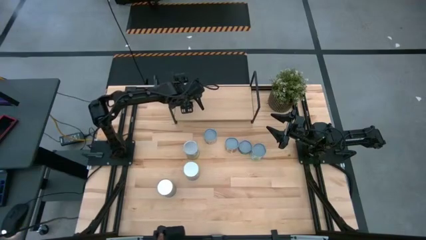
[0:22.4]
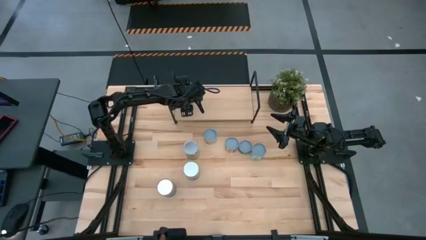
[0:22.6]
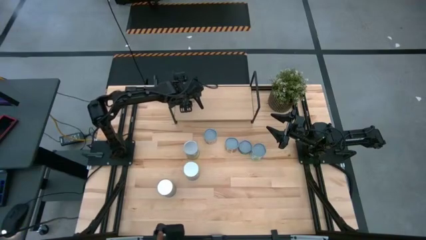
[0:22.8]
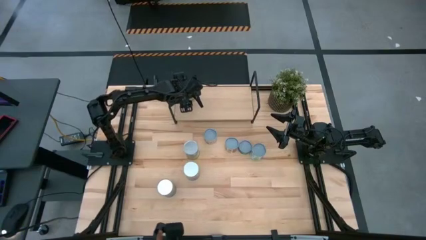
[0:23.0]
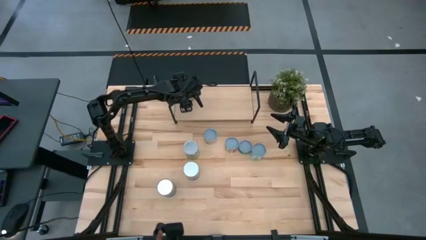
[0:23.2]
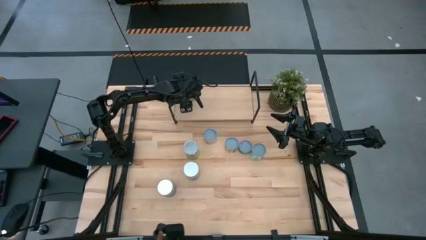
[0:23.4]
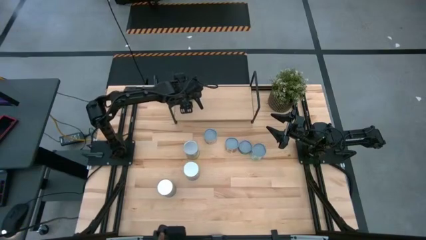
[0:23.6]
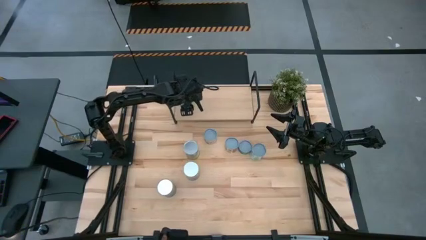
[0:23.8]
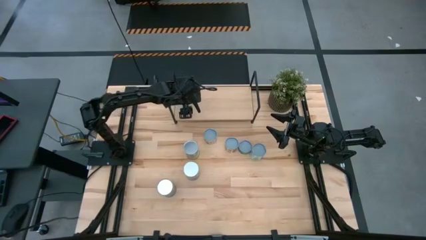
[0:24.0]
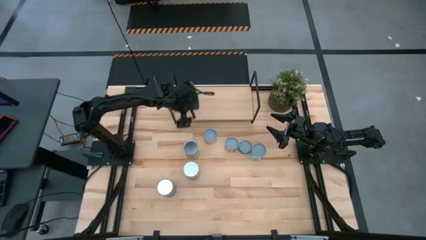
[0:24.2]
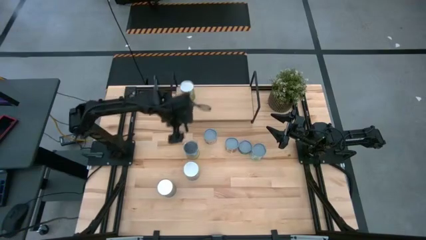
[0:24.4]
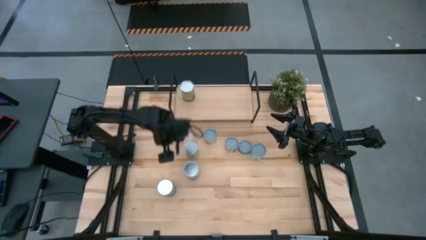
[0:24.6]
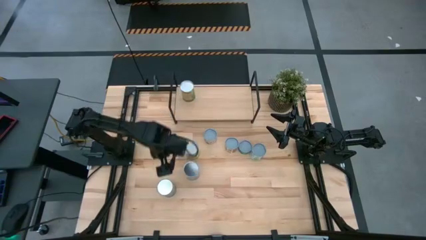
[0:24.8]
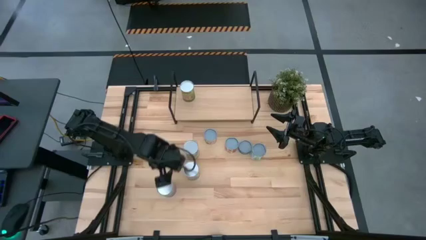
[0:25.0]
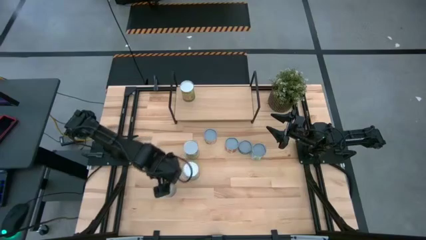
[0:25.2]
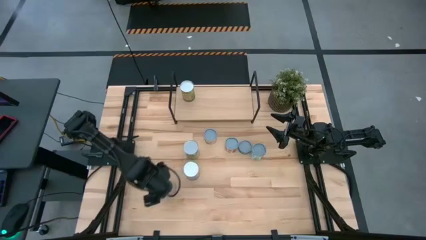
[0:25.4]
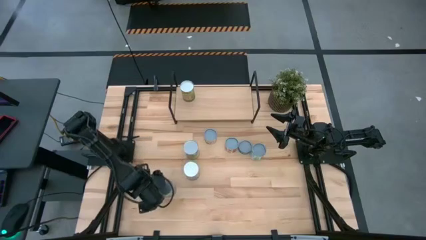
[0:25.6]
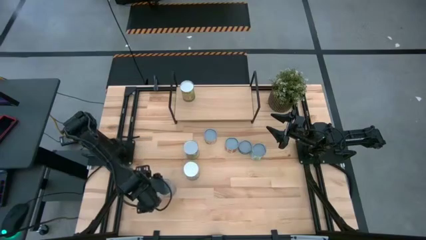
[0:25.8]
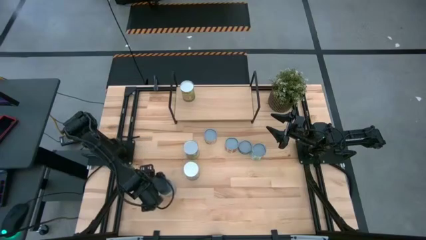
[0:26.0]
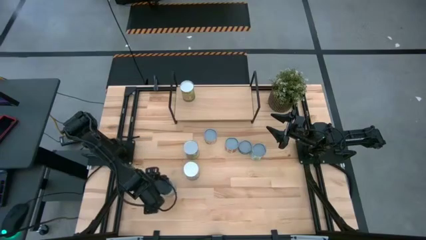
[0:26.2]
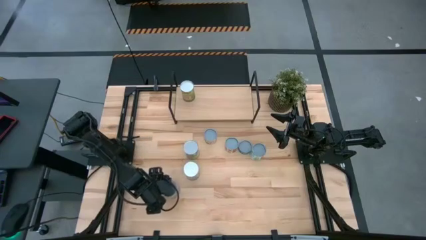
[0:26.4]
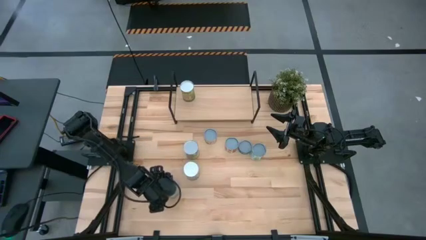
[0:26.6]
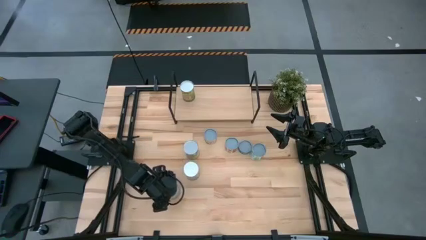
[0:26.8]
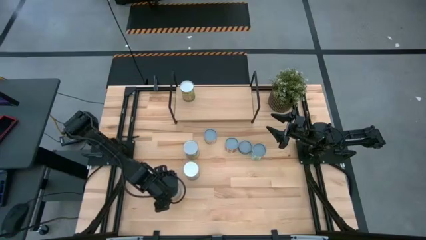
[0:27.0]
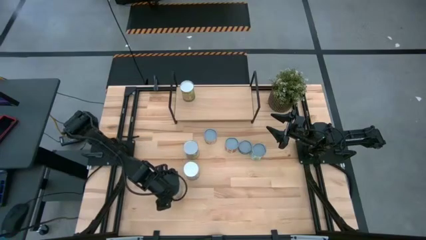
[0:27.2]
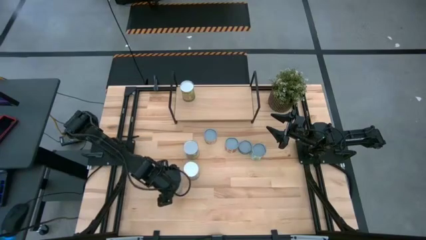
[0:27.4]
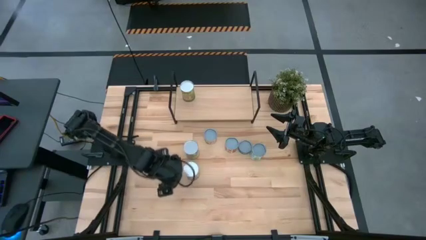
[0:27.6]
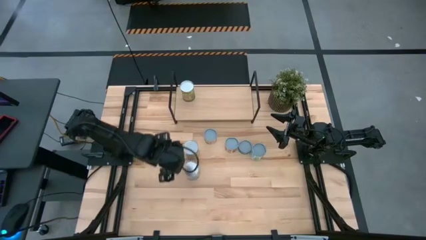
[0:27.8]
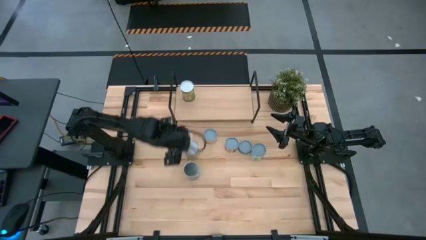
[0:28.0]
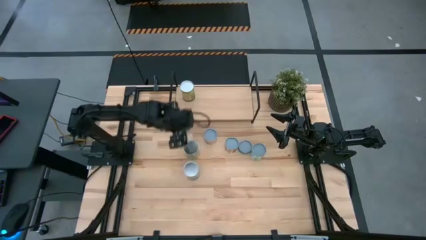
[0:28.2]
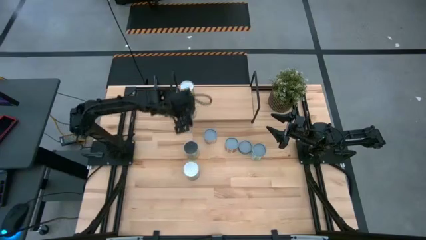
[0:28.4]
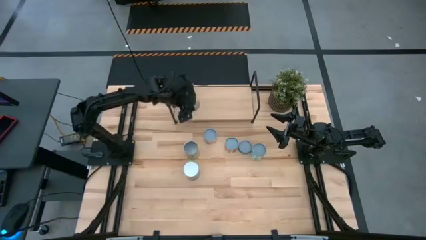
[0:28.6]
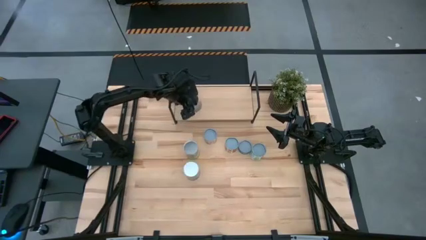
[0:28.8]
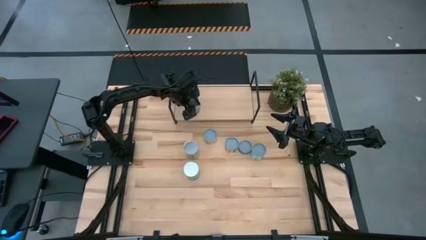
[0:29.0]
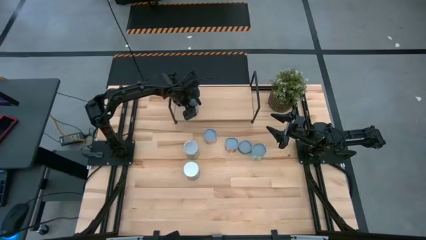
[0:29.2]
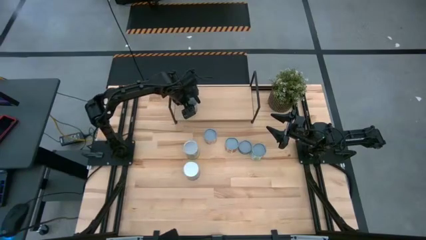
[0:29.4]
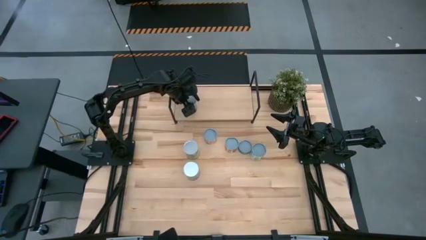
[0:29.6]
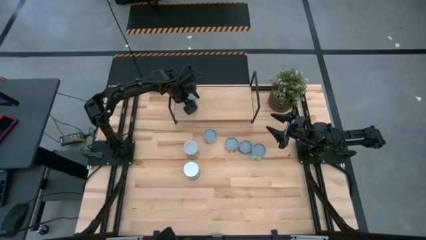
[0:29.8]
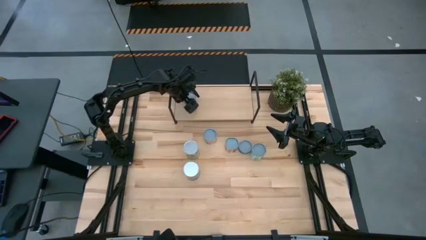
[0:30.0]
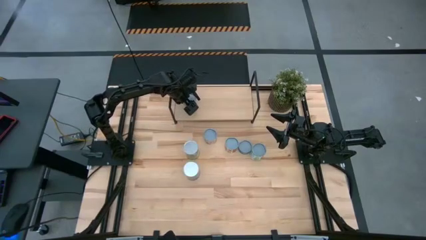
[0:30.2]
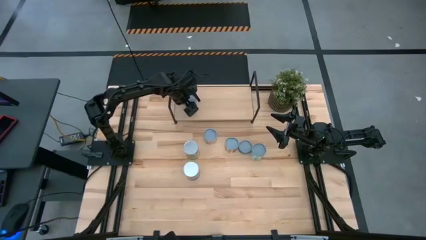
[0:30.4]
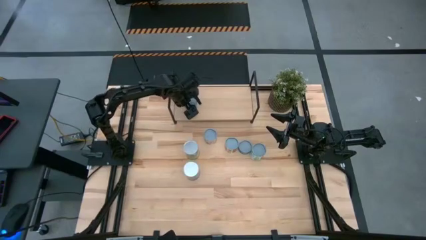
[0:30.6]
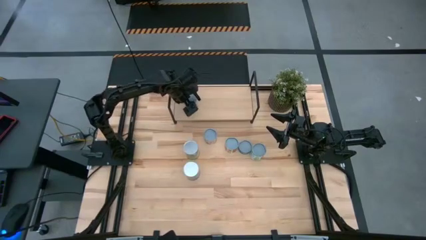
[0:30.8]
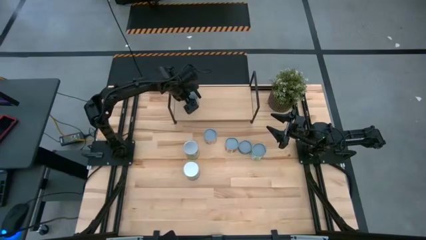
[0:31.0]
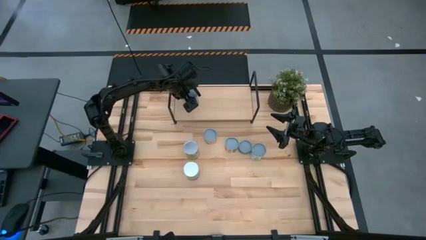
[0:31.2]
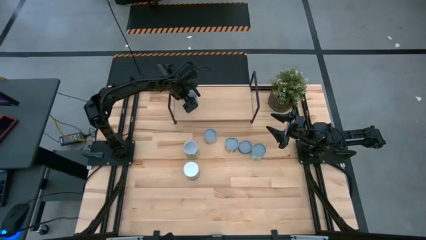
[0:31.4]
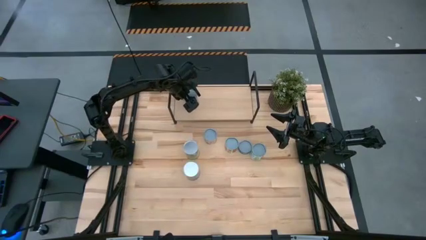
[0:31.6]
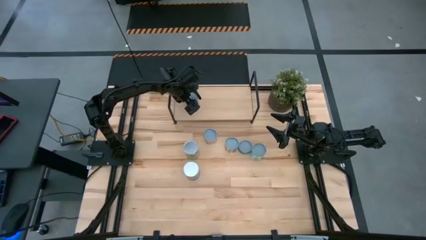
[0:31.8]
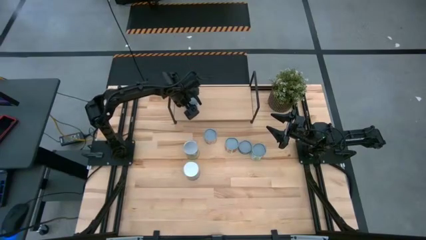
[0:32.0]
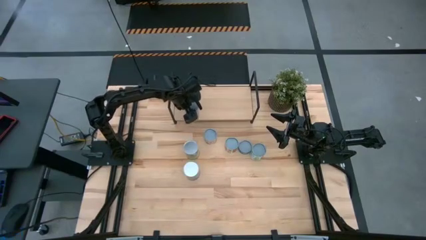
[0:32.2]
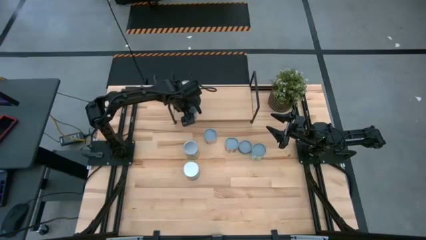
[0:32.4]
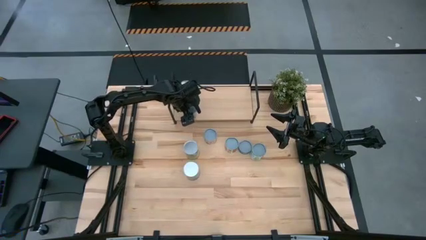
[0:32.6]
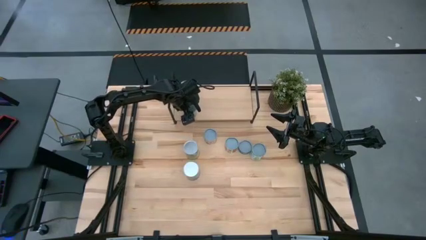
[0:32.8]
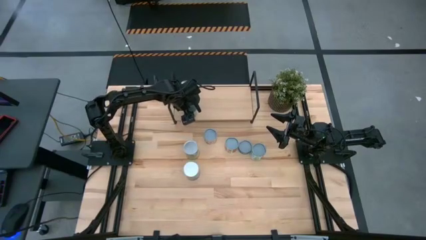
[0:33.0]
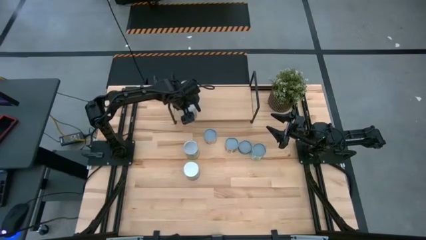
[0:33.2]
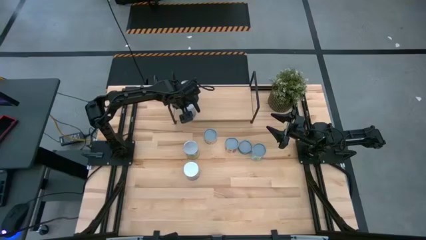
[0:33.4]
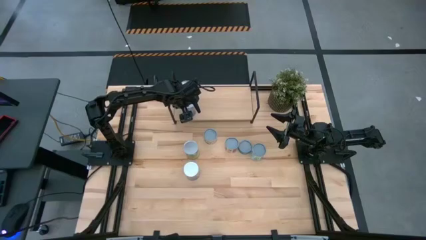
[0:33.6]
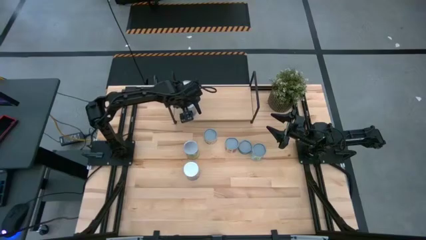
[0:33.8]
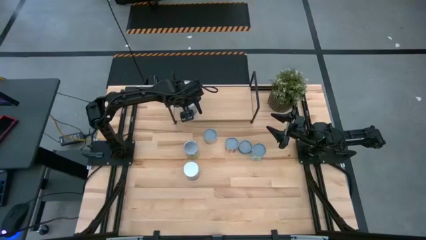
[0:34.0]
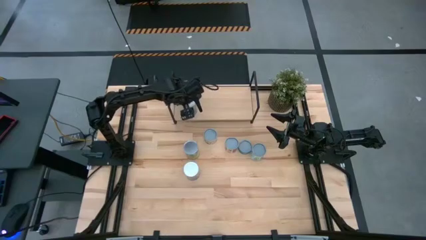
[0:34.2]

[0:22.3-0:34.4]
Task: Pick and place cans onto a shelf
Put the canned peas on the shelf

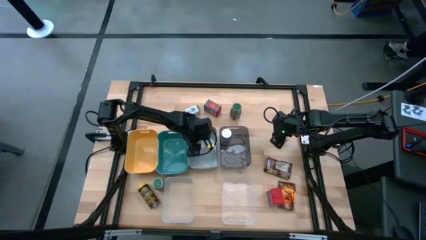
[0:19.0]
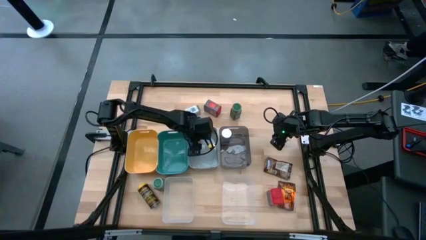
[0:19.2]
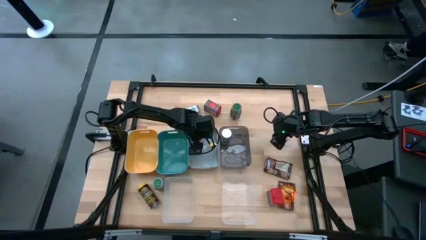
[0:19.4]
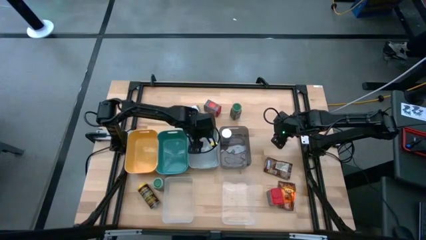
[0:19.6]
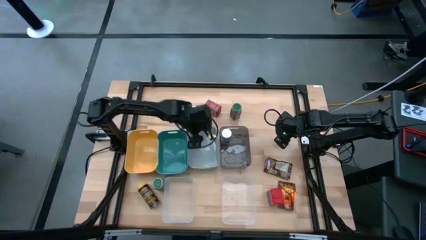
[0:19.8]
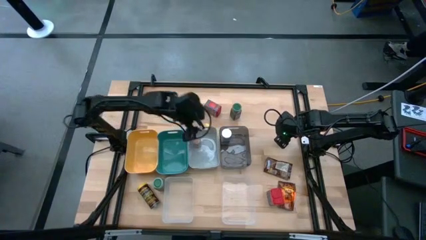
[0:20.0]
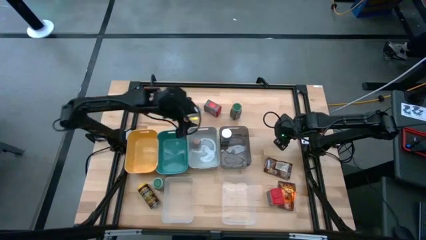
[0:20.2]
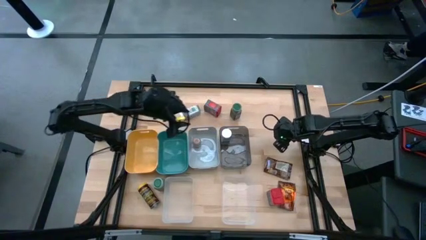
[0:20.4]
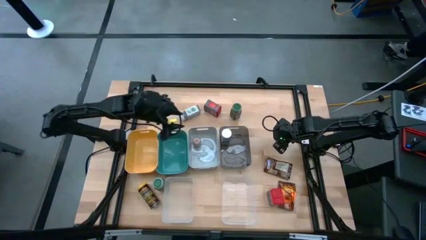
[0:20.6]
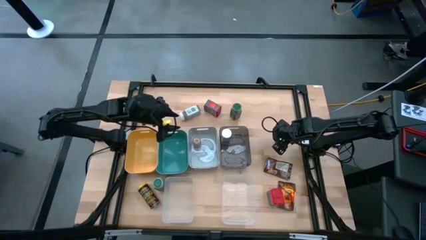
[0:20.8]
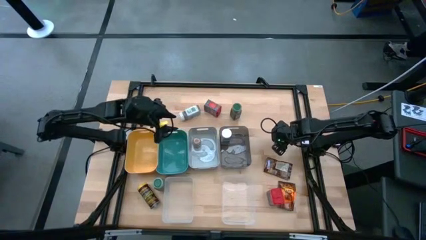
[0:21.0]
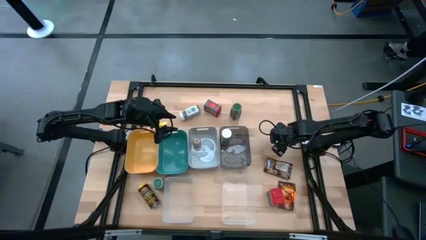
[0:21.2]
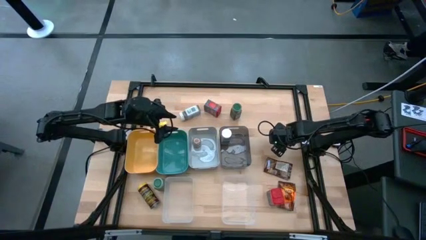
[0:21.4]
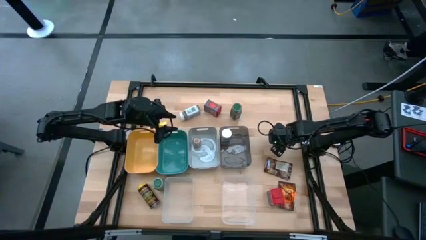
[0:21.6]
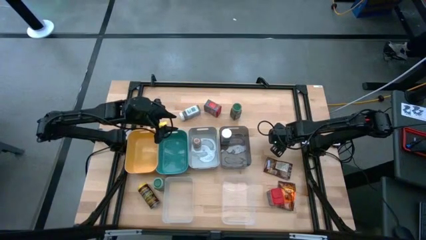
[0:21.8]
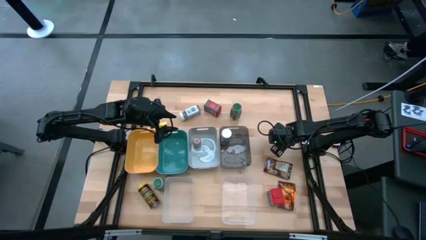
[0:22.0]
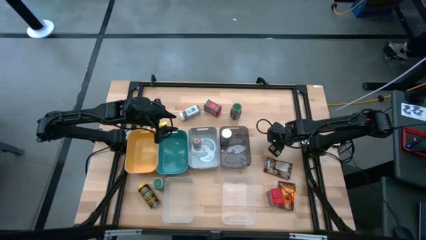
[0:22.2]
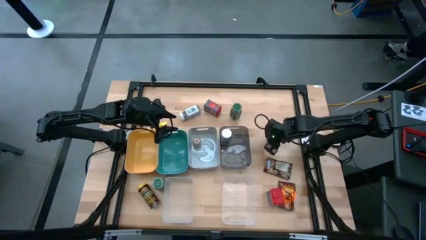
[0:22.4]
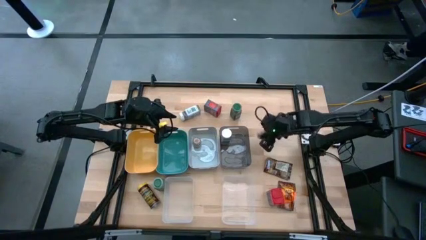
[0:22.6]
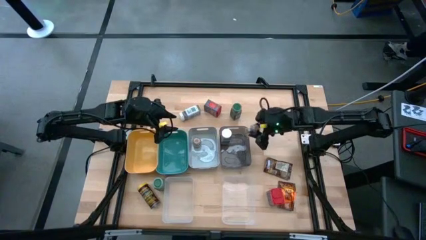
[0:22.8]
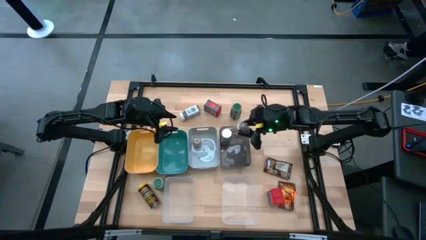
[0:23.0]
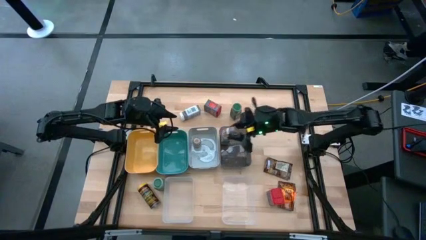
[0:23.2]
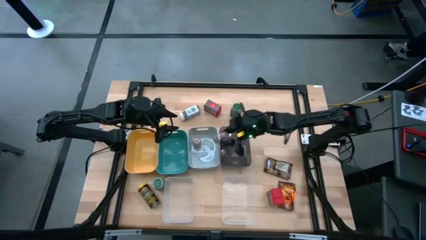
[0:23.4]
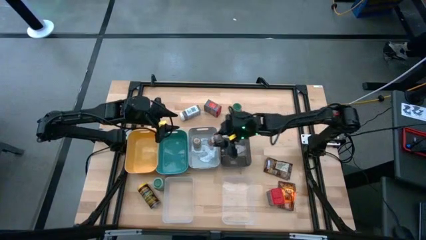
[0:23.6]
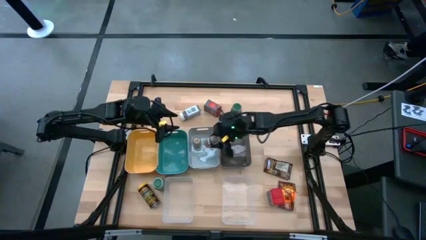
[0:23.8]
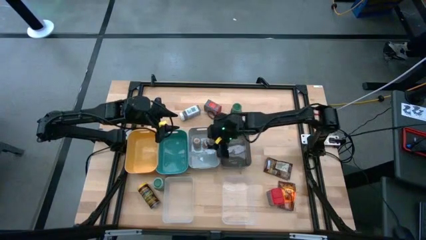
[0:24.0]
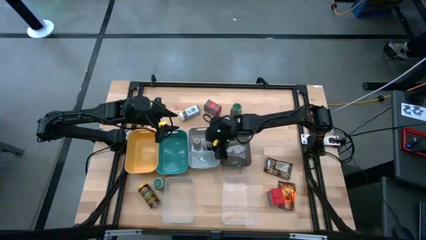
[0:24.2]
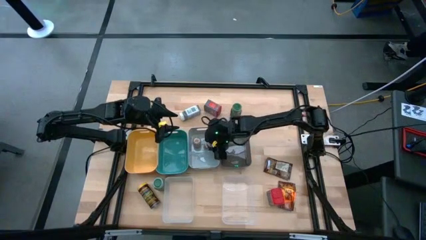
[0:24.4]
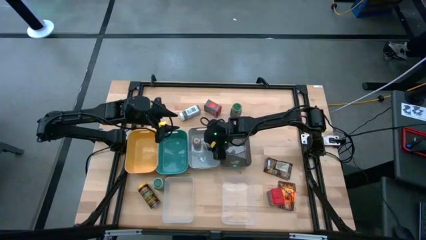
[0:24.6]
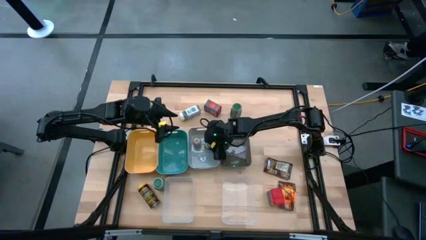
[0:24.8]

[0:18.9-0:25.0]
Task: Sort spices by type
Put the brown seasoning bottle into the gray bin
